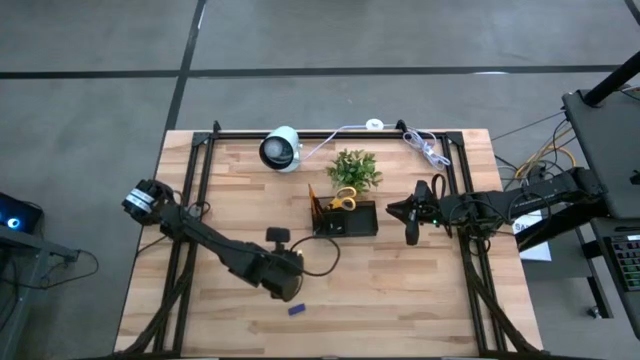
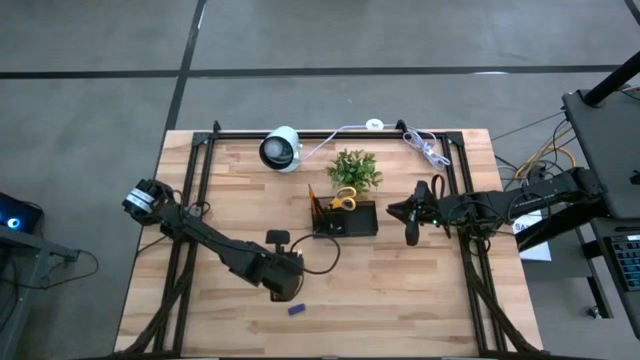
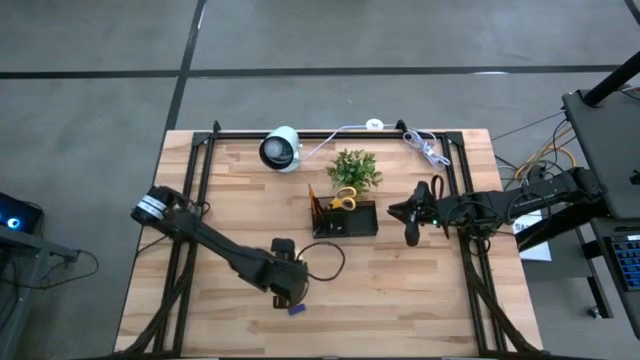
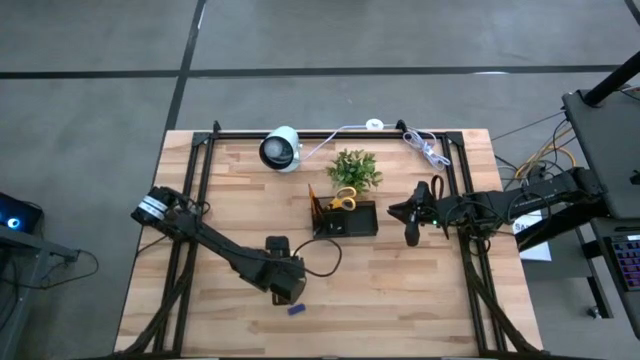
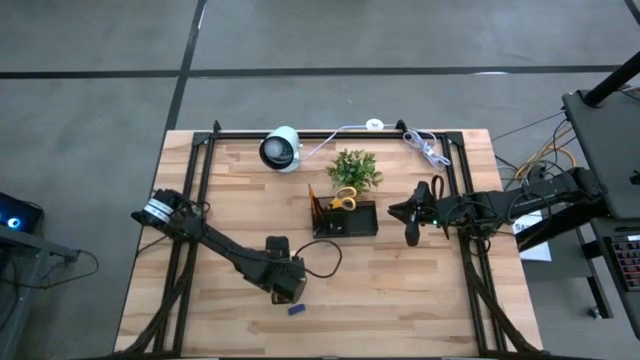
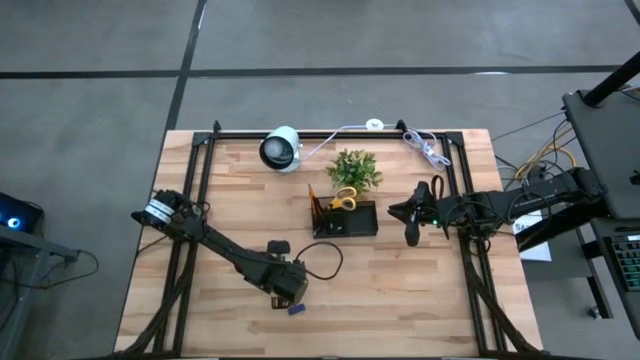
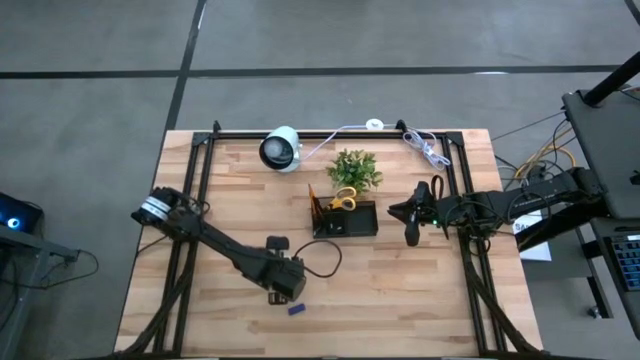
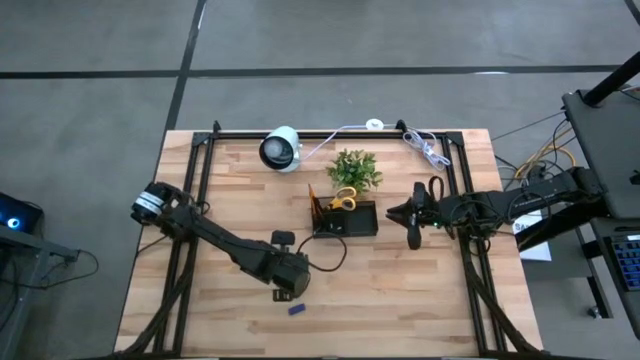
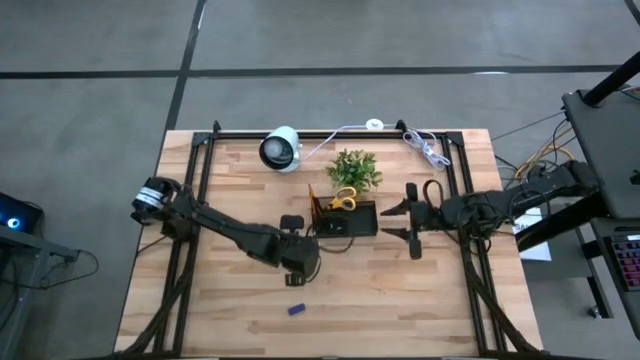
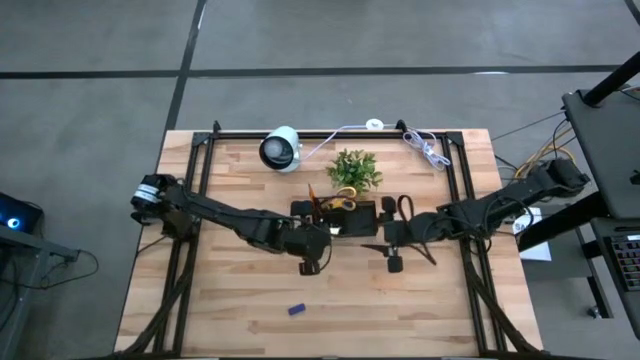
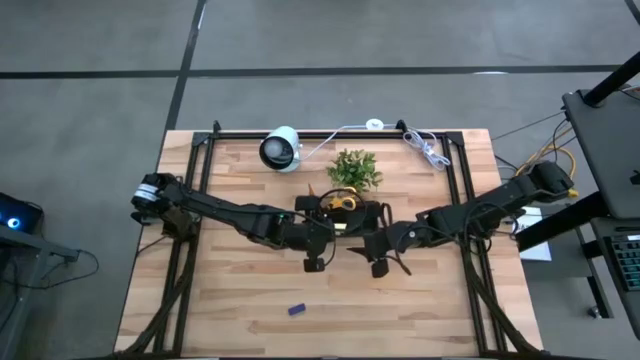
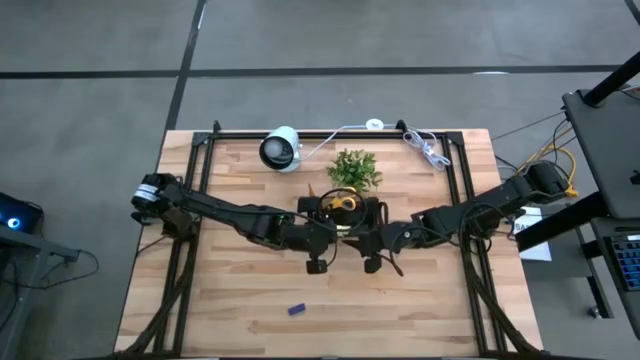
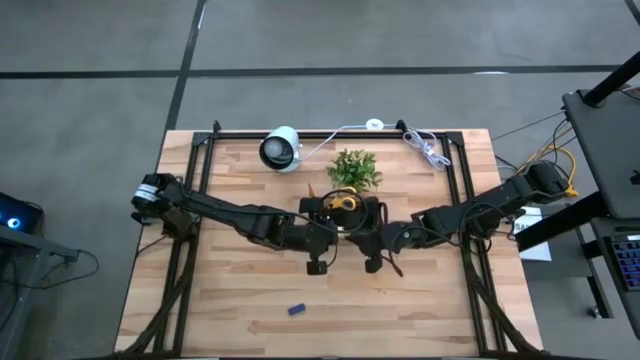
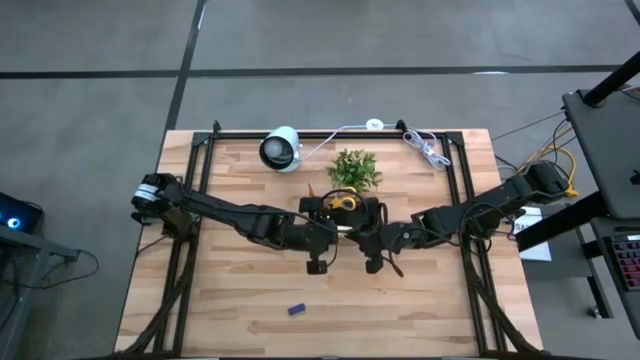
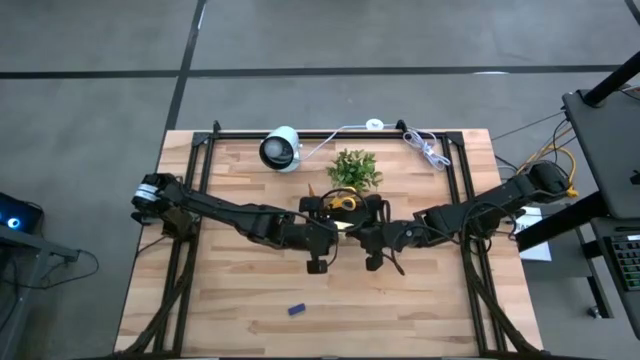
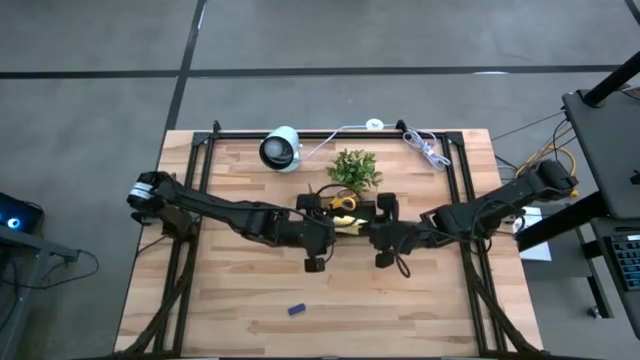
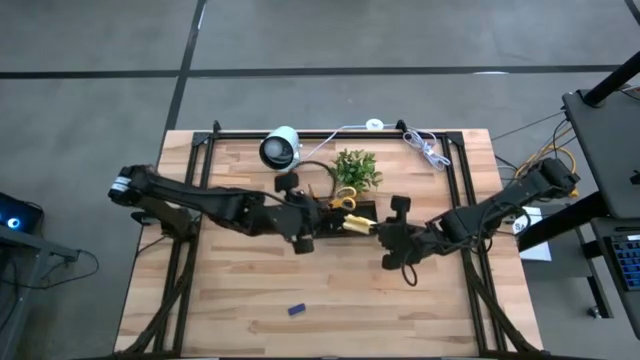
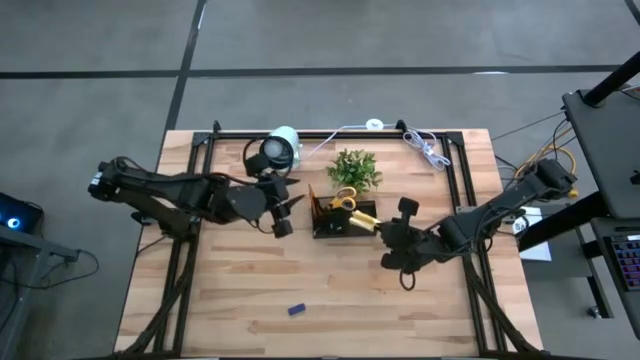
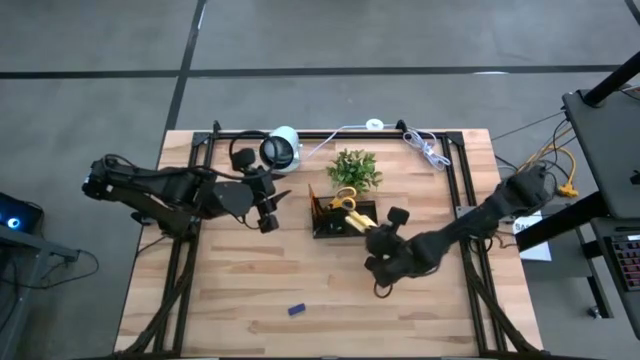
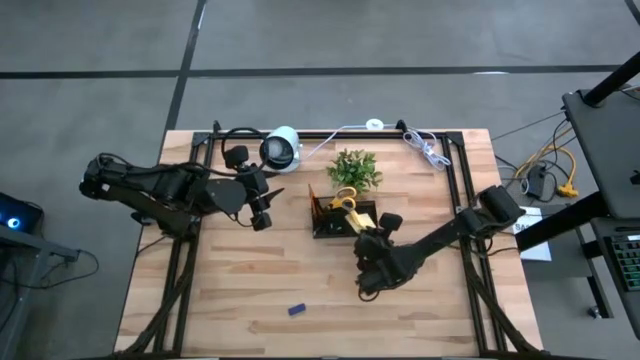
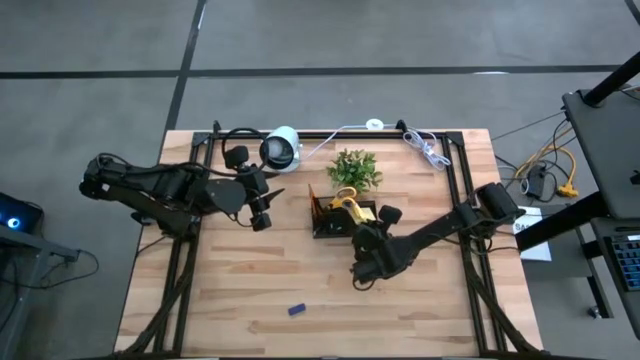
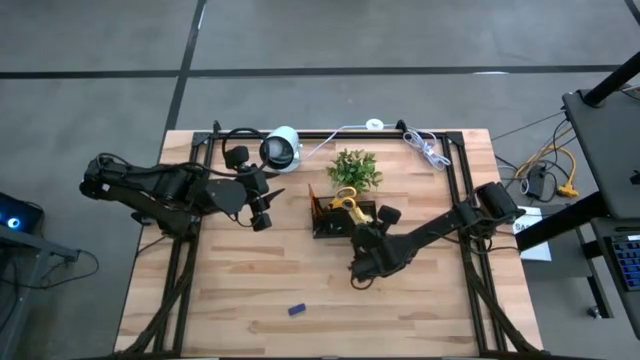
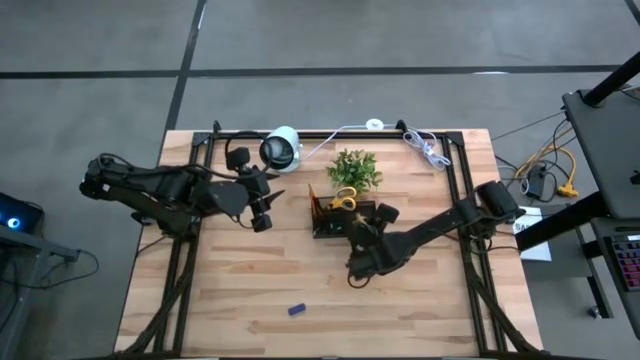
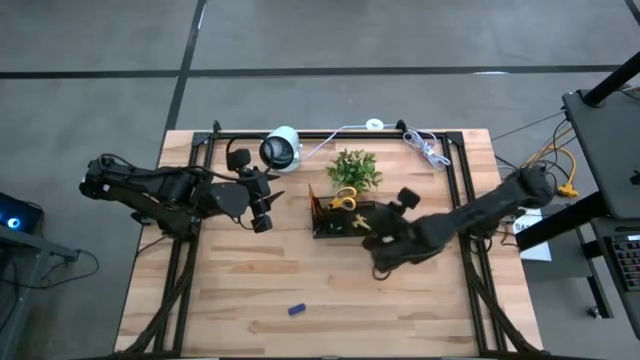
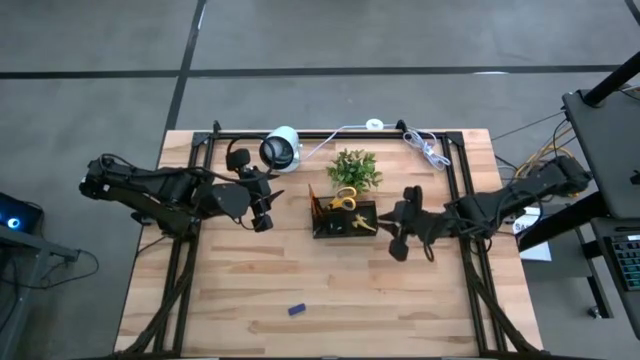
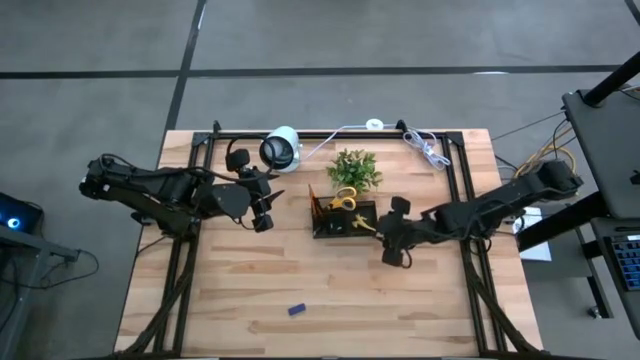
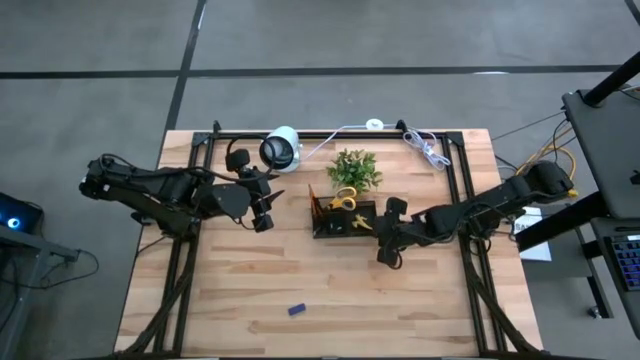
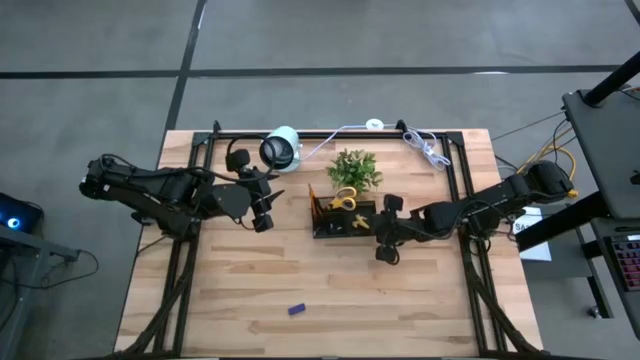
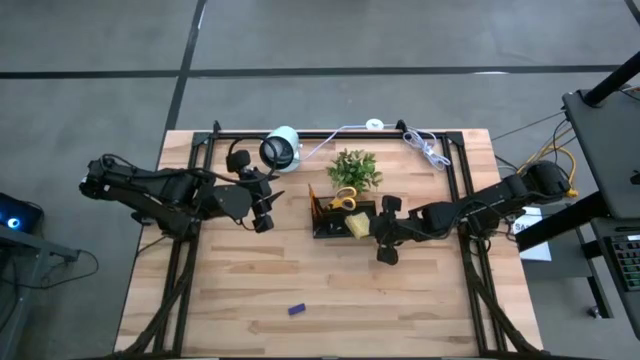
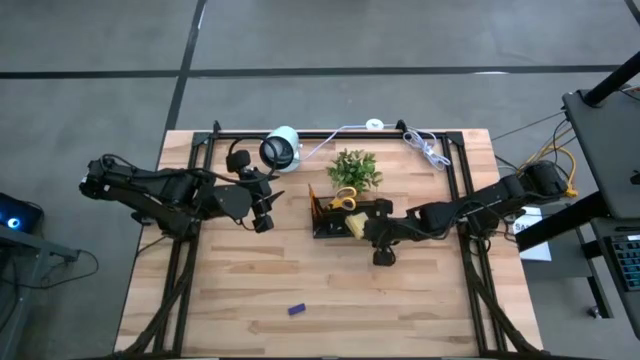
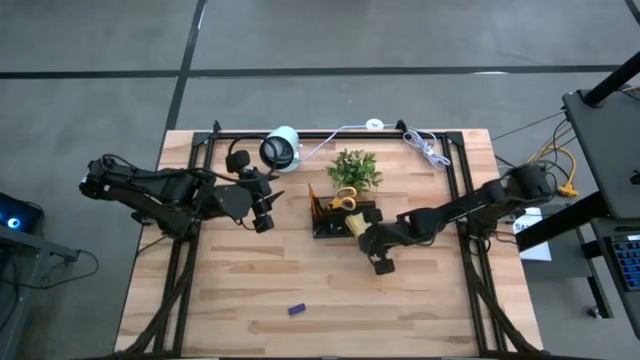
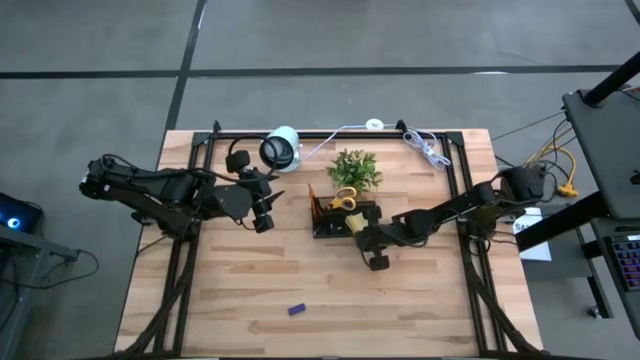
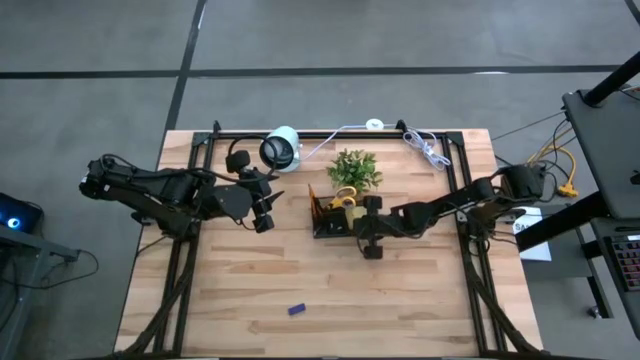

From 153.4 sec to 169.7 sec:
Task: Pick and place office supplies into organizer
Put the yellow sticky notes into the black desk organizer

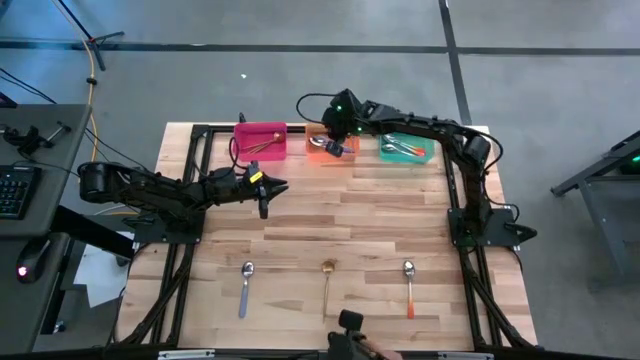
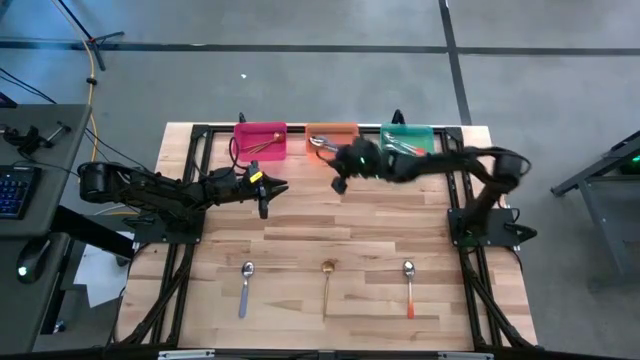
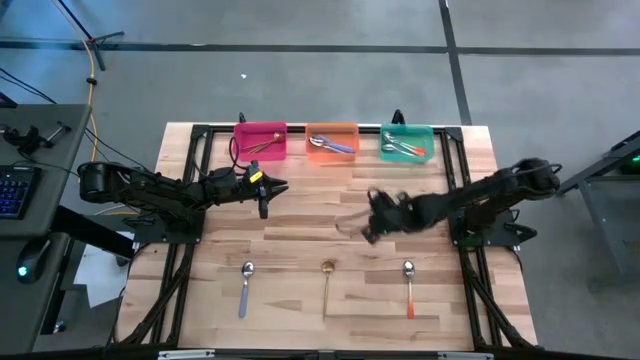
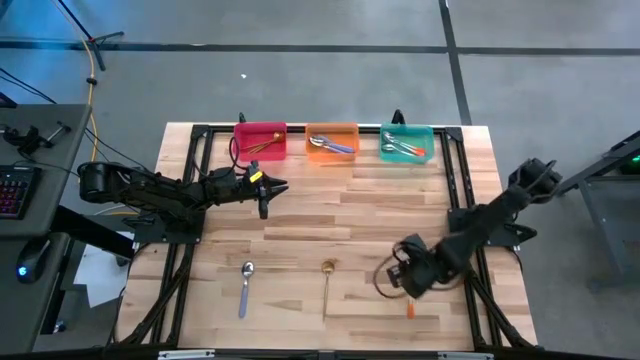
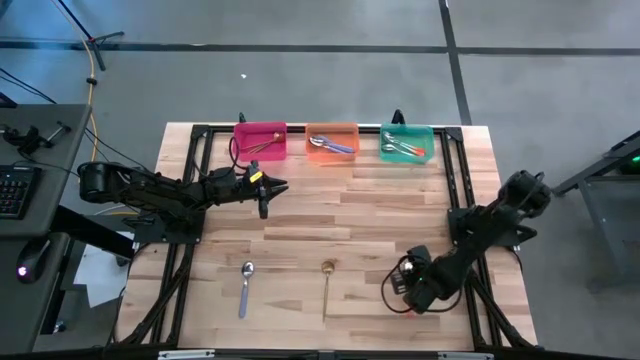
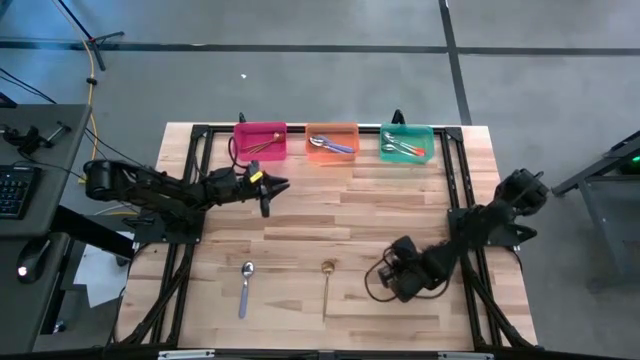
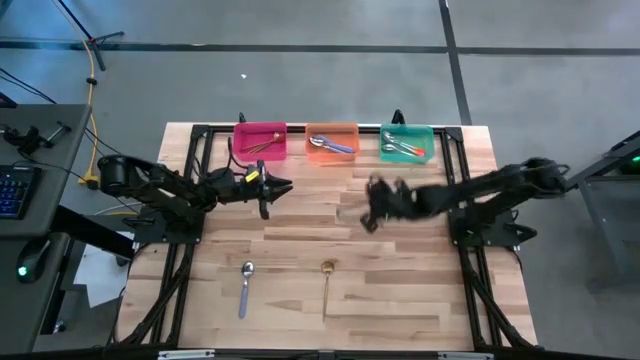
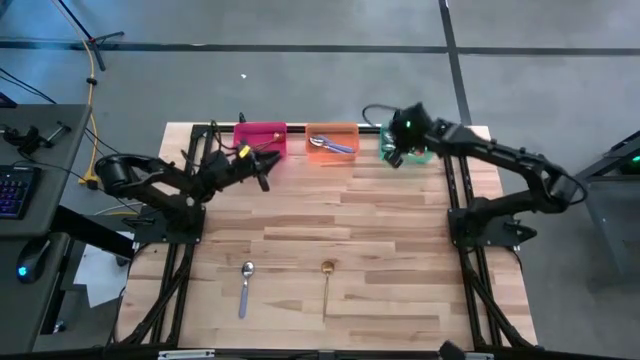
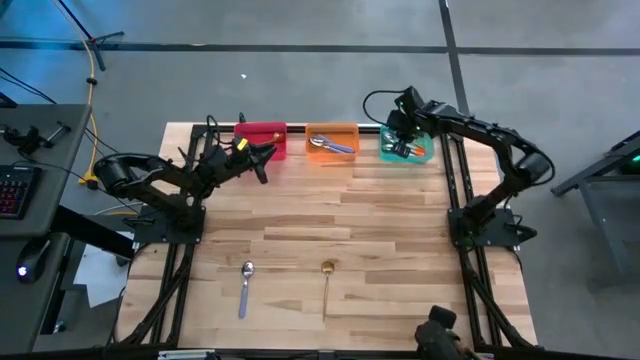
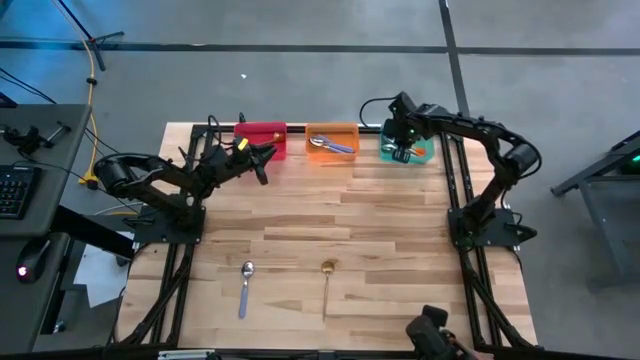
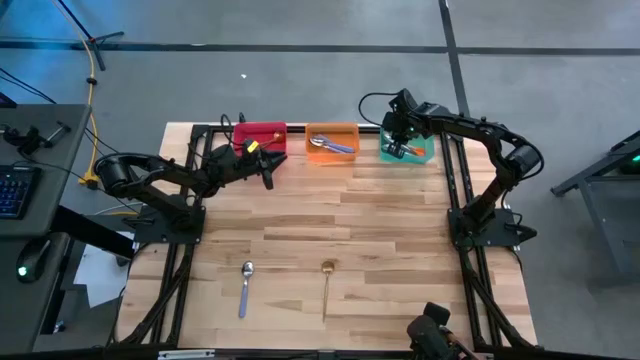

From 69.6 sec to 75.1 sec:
Task: Sort silverware by color (type)
Put the orange spoon into the green bin
